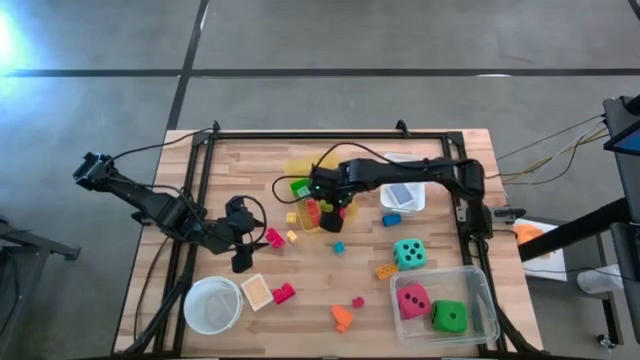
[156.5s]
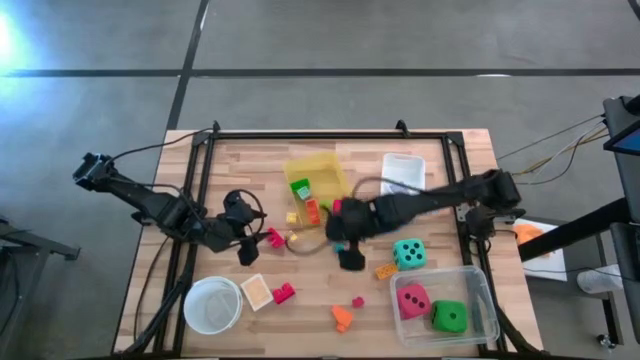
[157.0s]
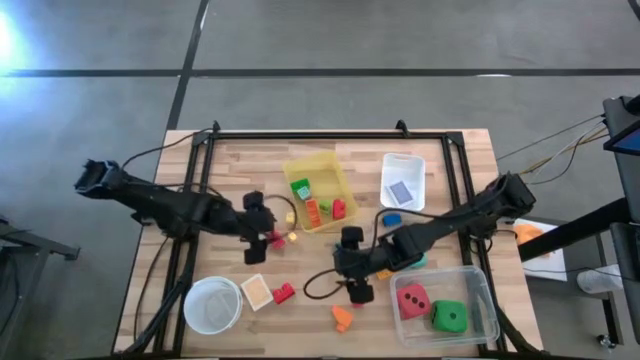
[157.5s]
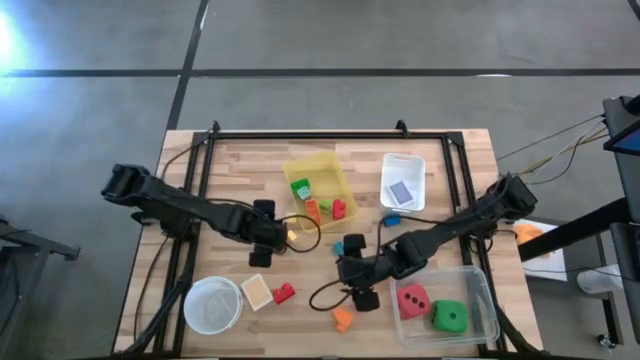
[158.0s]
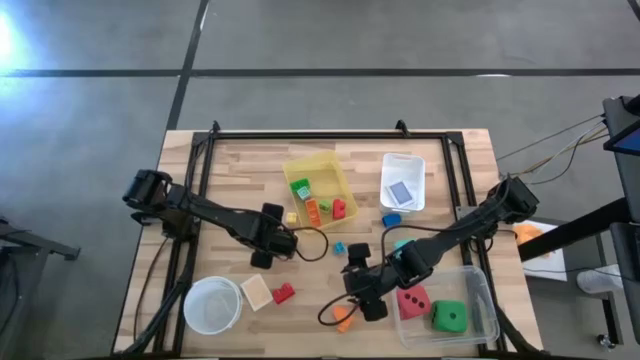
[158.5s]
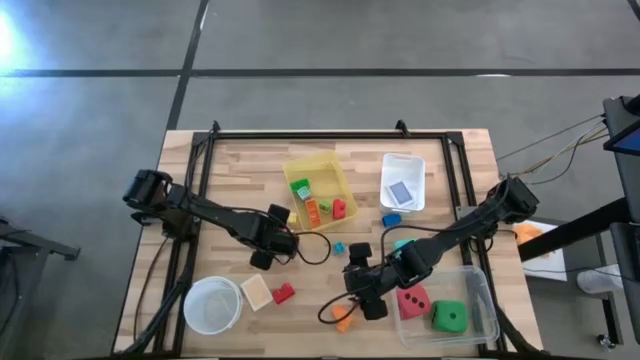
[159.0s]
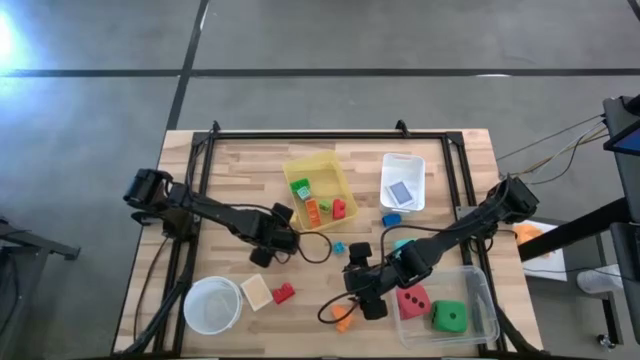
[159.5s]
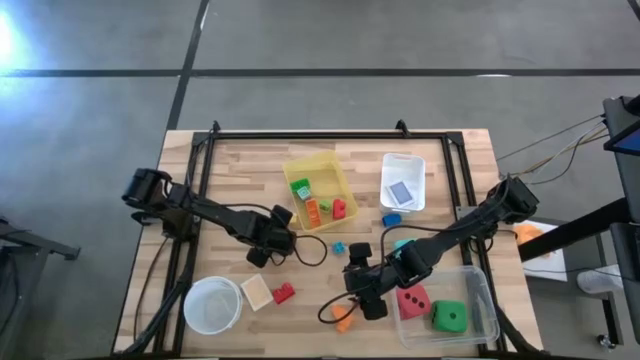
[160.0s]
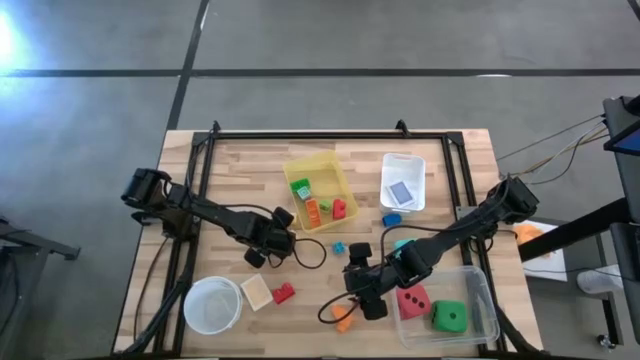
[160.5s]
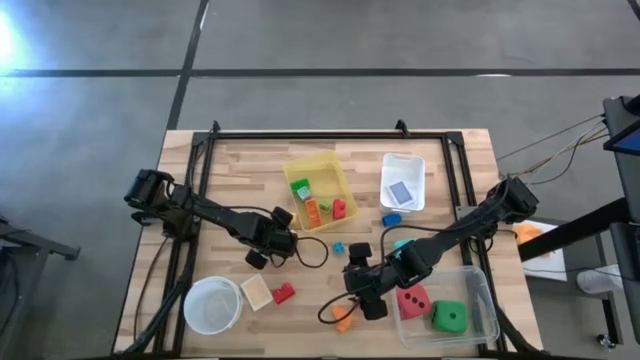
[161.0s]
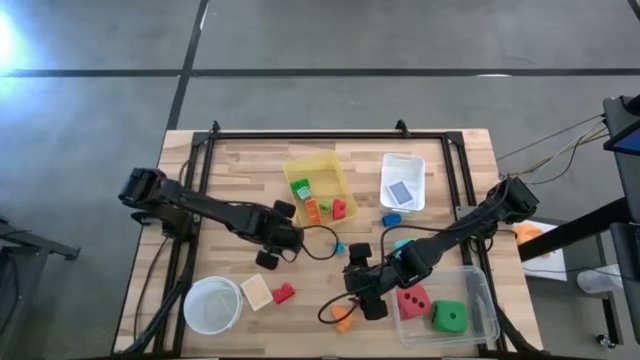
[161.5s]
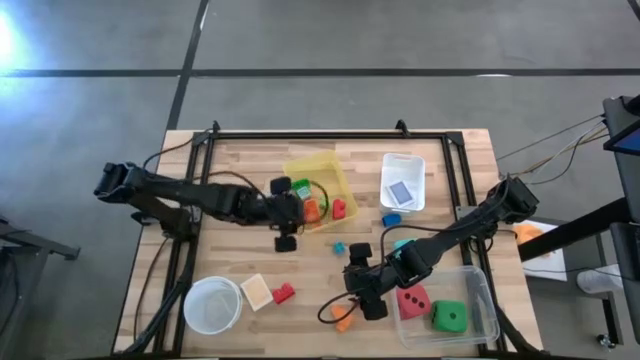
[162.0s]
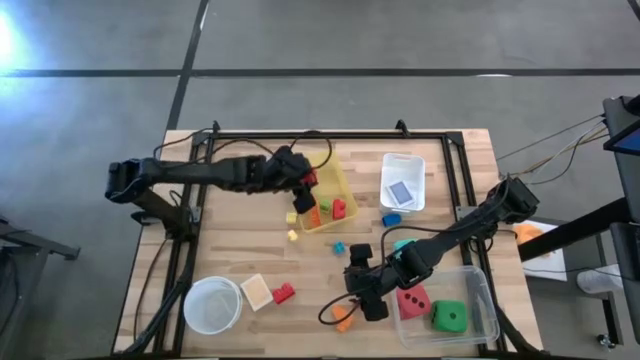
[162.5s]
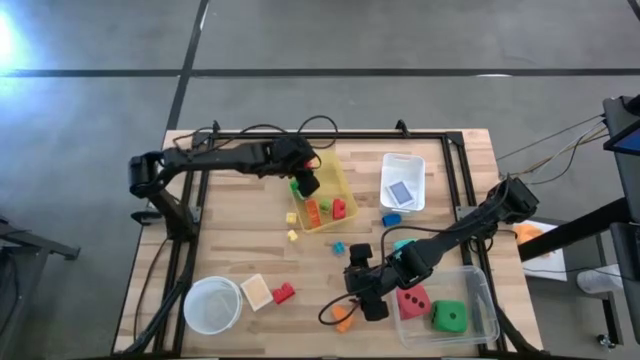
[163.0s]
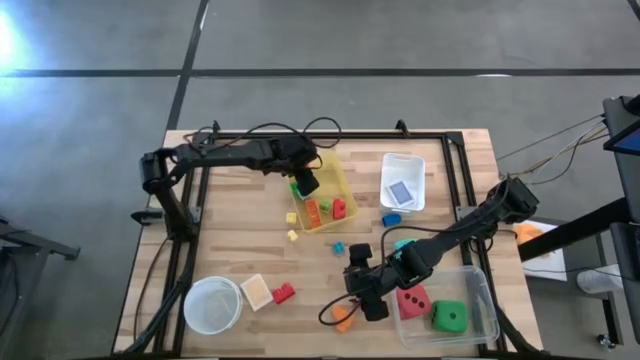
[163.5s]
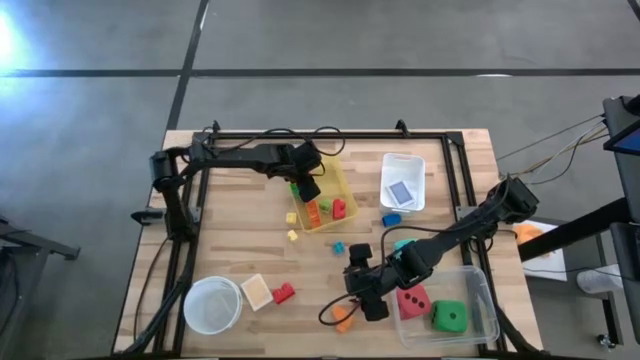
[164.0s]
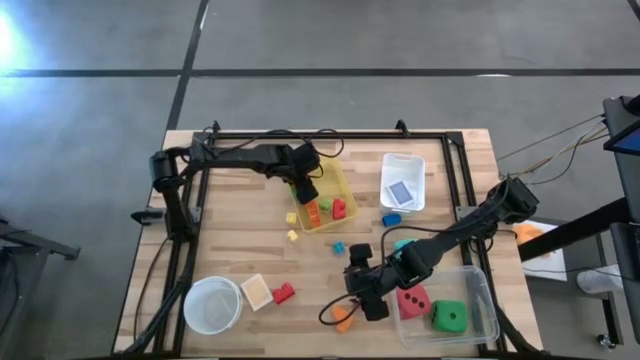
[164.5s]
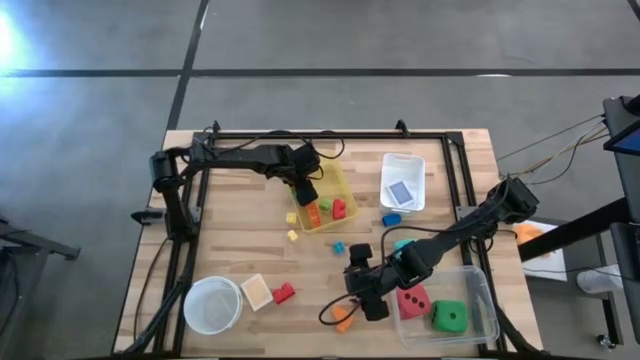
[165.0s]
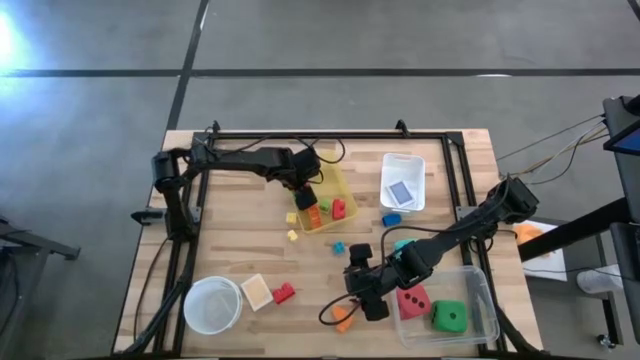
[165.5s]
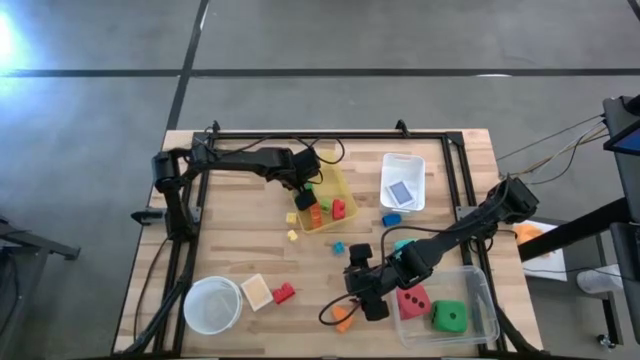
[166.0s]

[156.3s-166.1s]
Task: Pick & Place Toys
Put the red game piece into the yellow bin

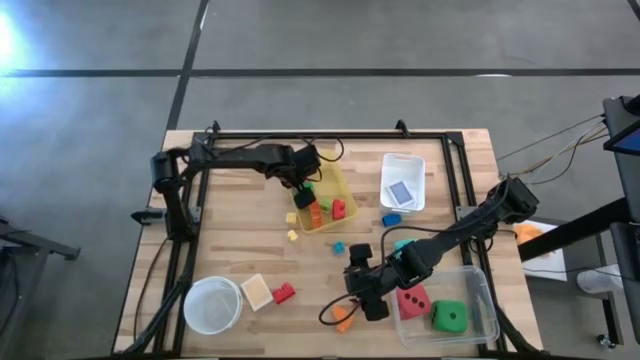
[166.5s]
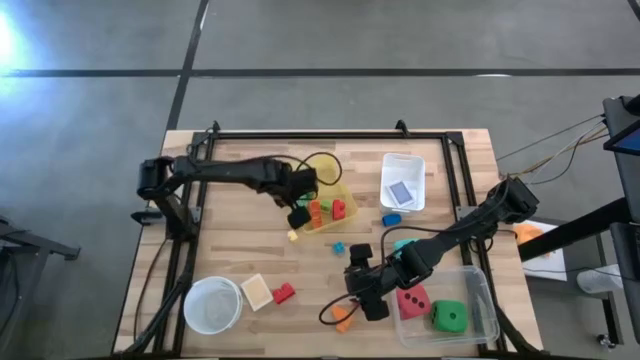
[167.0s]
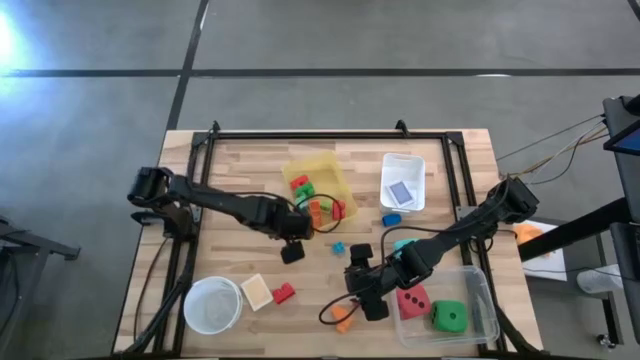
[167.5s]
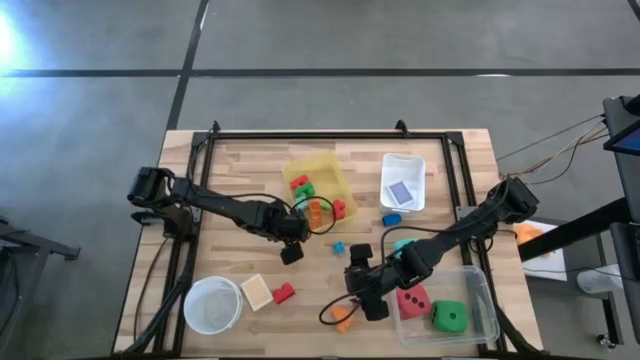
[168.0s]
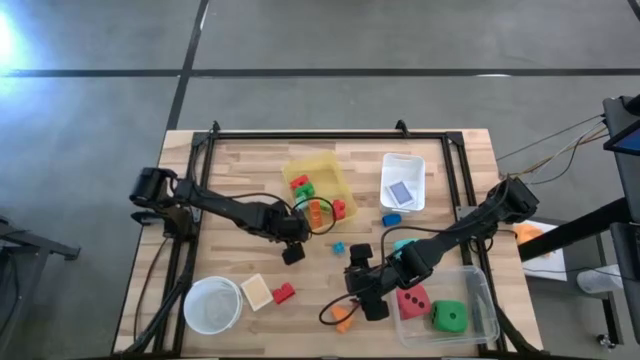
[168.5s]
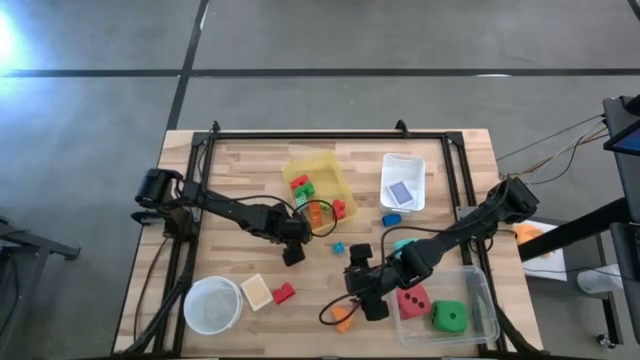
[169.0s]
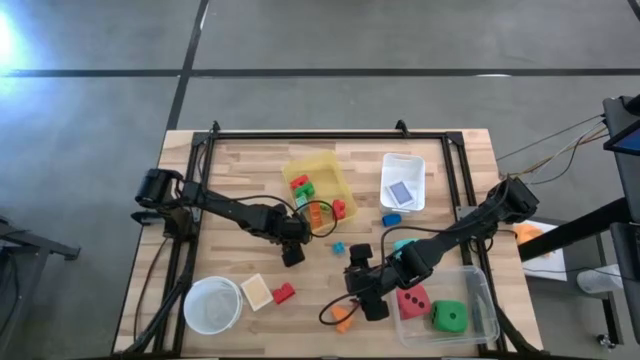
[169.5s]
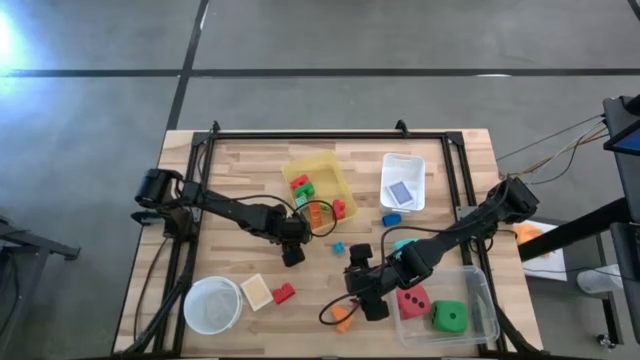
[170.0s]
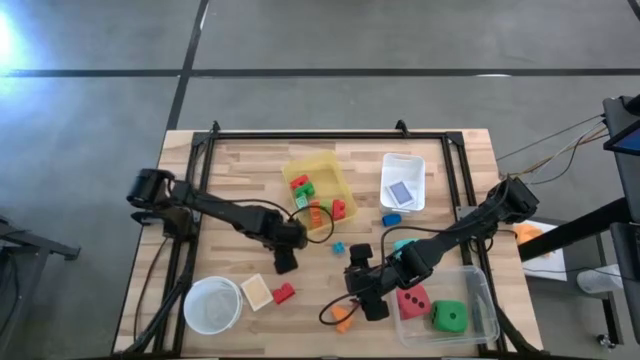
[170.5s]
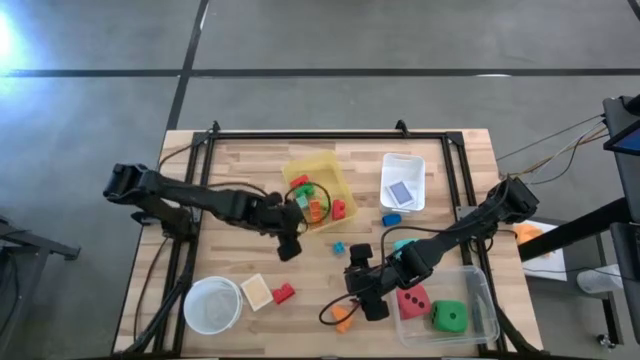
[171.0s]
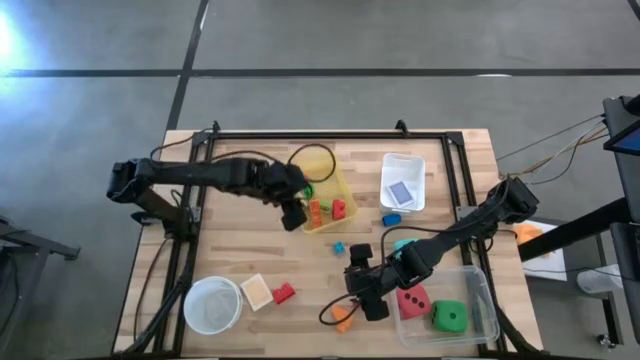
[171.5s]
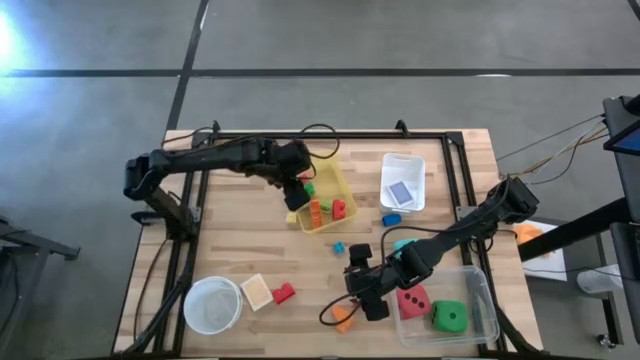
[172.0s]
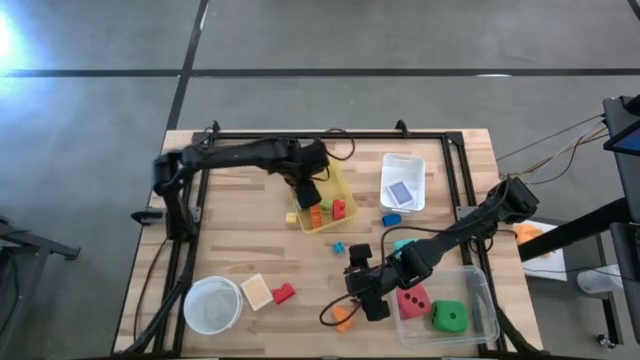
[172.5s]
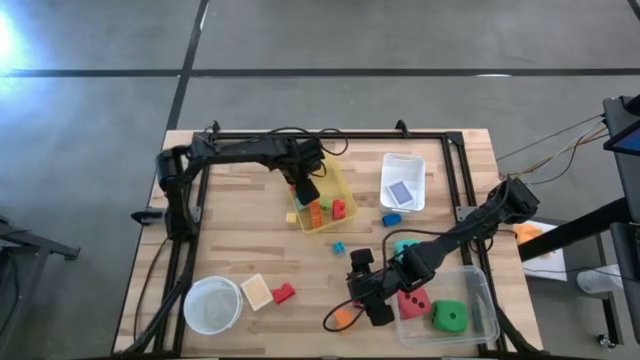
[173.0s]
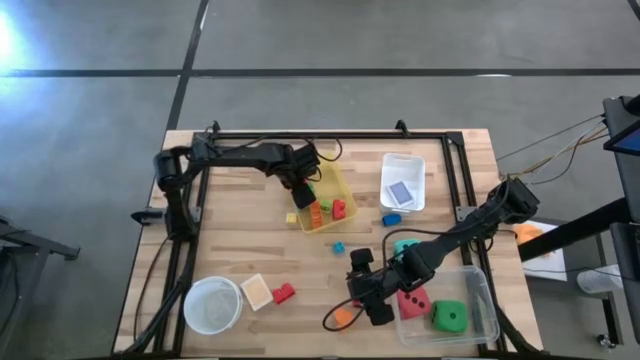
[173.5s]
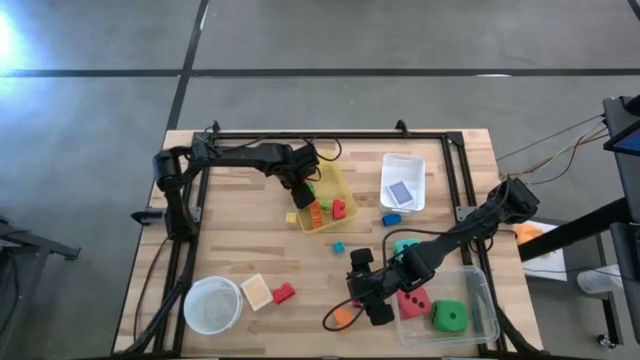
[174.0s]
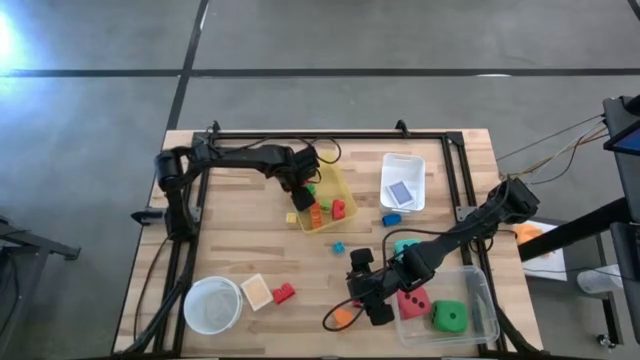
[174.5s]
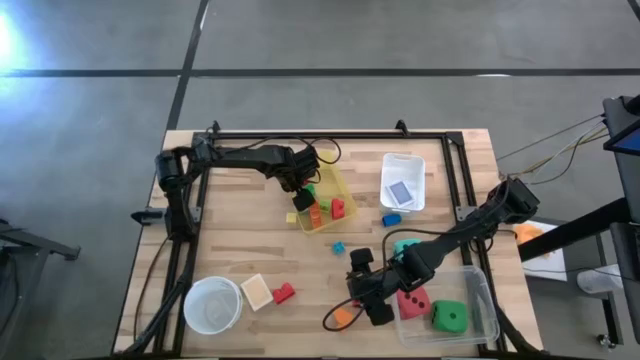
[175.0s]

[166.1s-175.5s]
Put the yellow game piece into the yellow bin

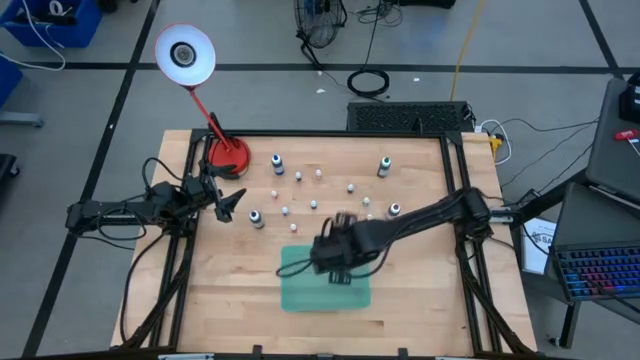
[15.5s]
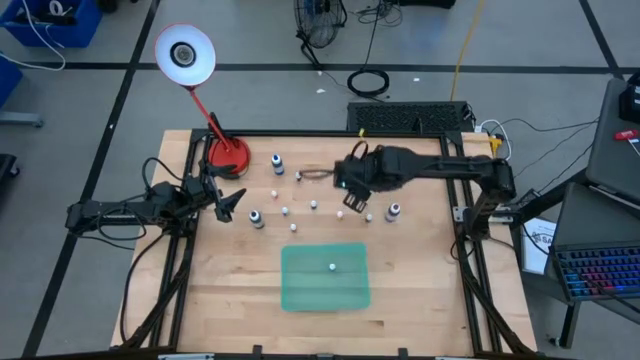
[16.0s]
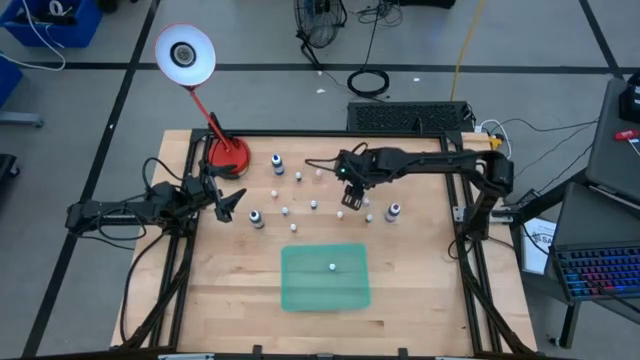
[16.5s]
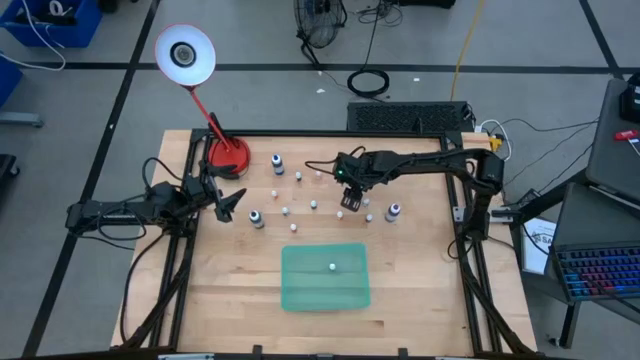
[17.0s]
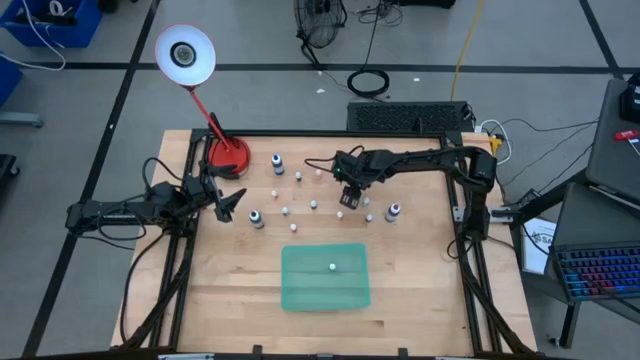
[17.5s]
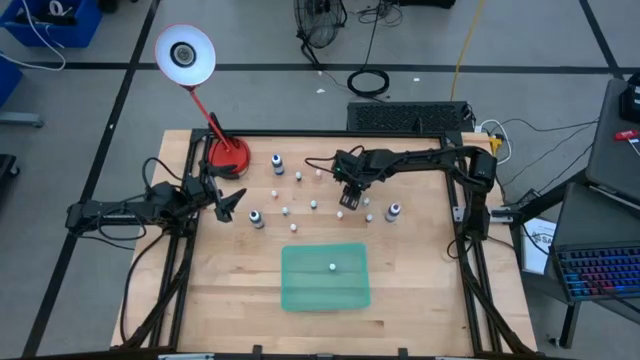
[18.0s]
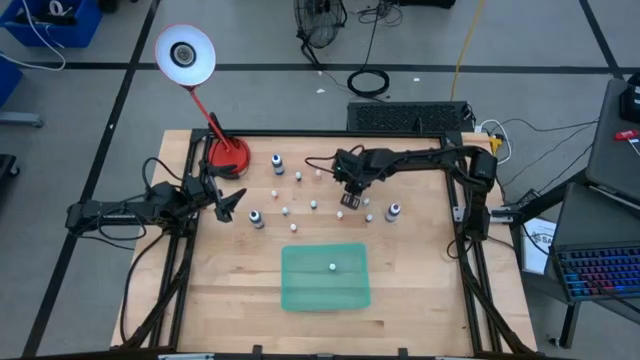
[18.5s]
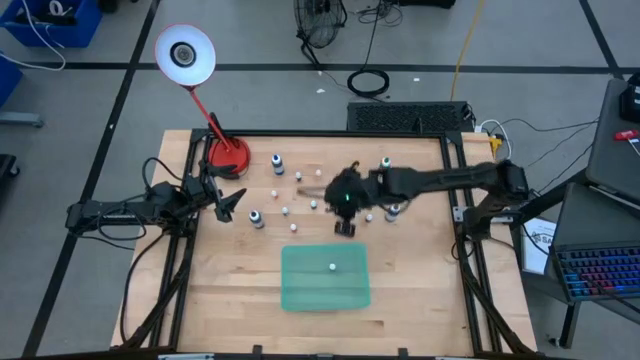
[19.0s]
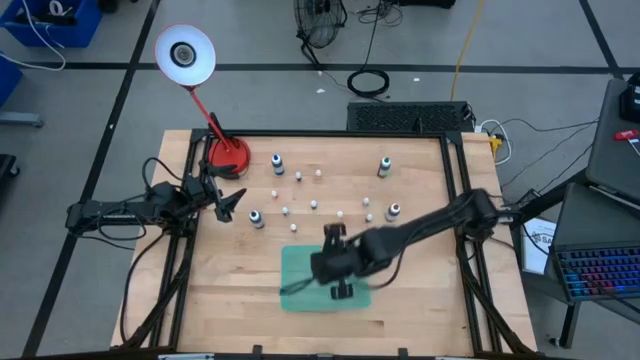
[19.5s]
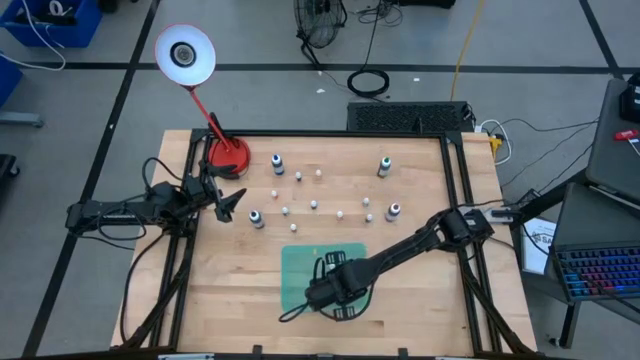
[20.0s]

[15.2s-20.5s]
Task: Pick & Place food coloring
Put the small black food coloring bottle into the blue bin
